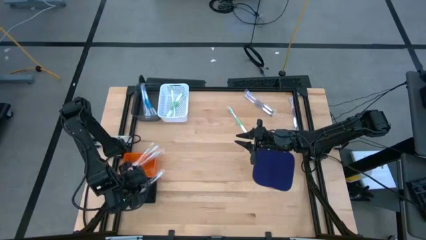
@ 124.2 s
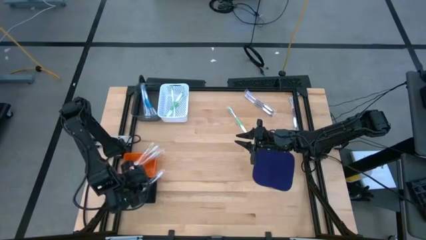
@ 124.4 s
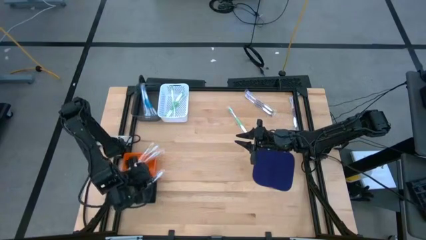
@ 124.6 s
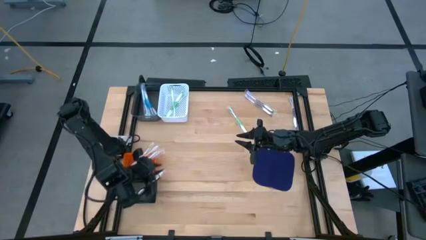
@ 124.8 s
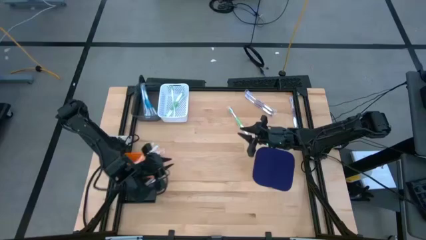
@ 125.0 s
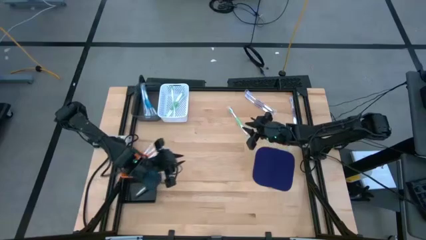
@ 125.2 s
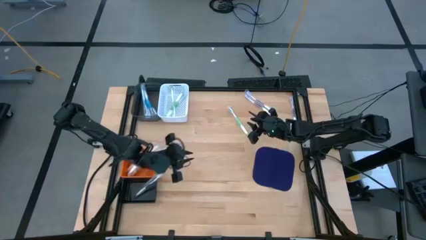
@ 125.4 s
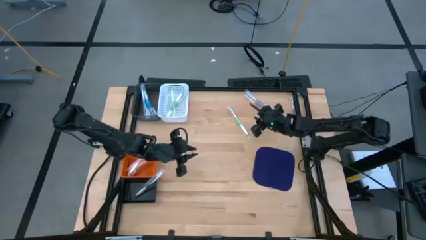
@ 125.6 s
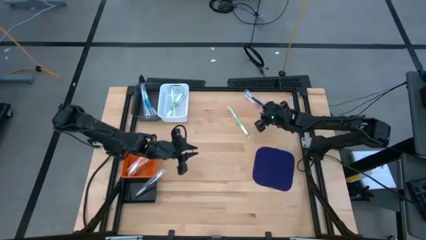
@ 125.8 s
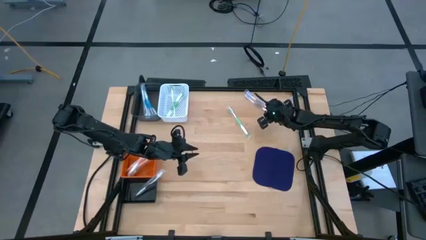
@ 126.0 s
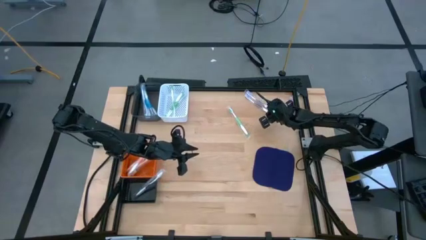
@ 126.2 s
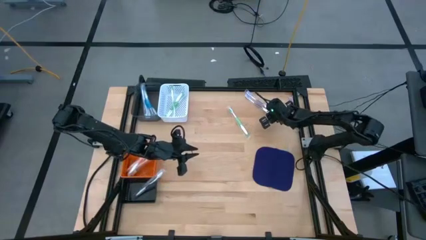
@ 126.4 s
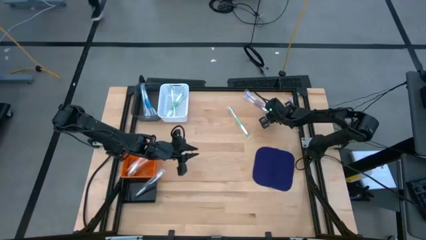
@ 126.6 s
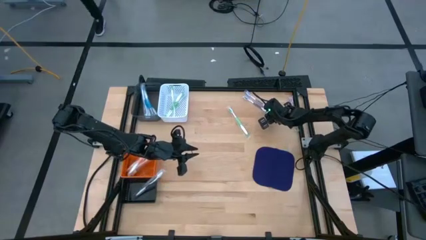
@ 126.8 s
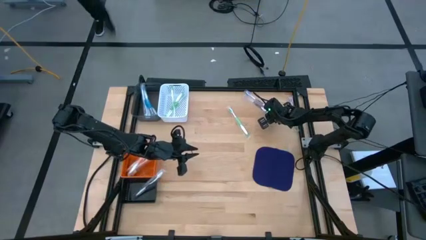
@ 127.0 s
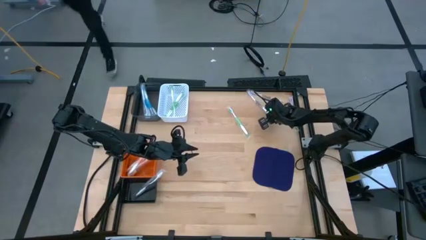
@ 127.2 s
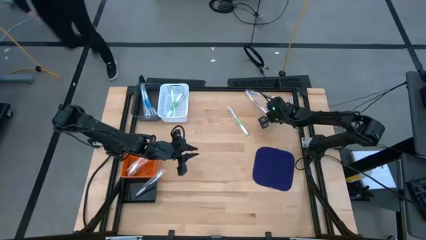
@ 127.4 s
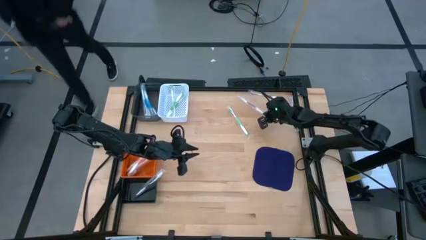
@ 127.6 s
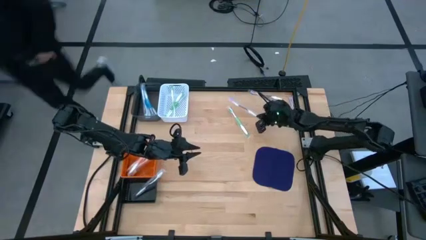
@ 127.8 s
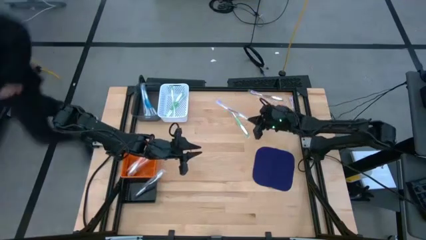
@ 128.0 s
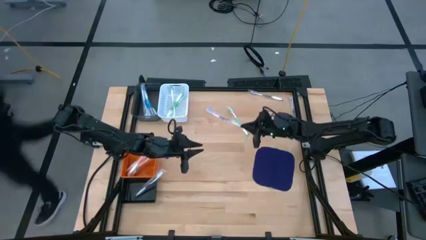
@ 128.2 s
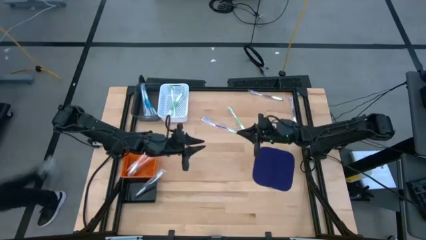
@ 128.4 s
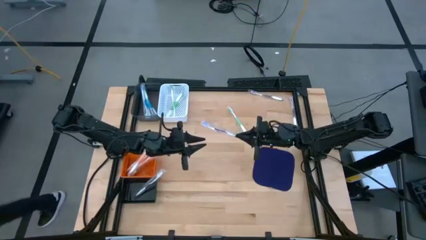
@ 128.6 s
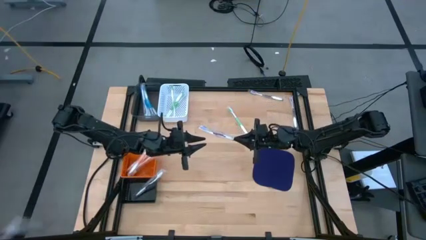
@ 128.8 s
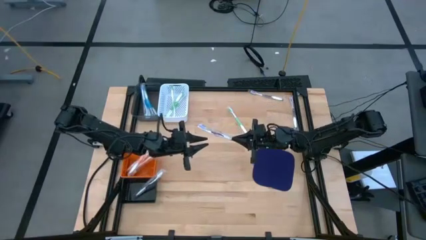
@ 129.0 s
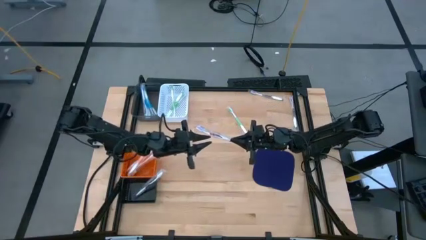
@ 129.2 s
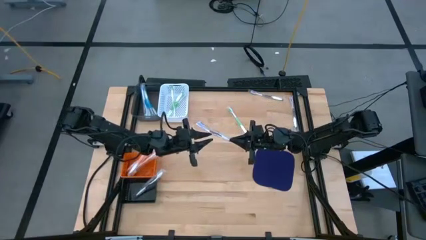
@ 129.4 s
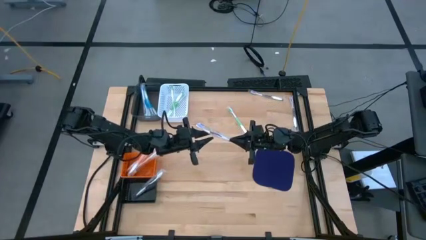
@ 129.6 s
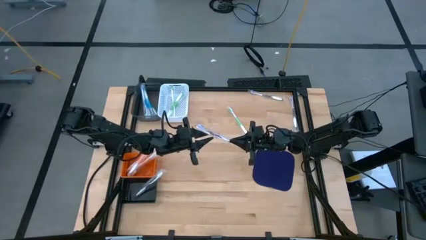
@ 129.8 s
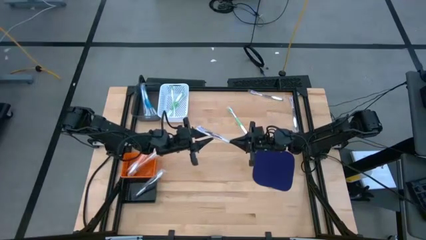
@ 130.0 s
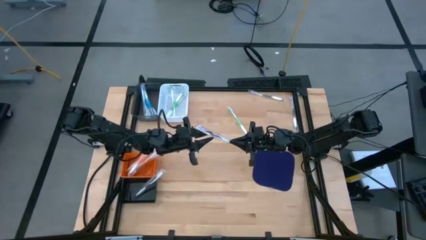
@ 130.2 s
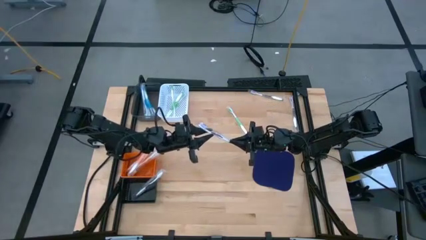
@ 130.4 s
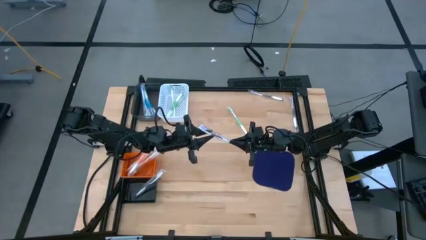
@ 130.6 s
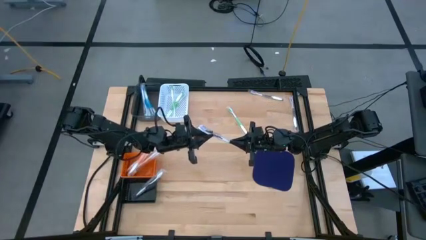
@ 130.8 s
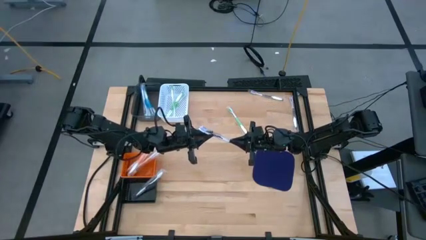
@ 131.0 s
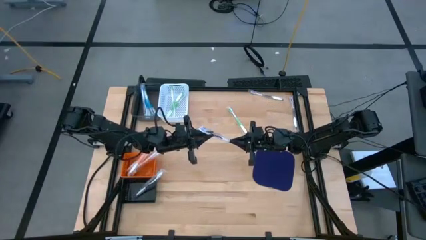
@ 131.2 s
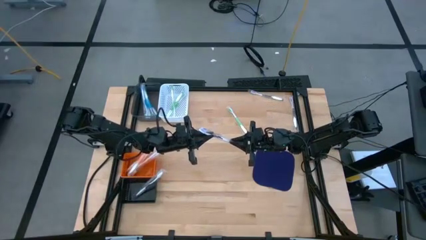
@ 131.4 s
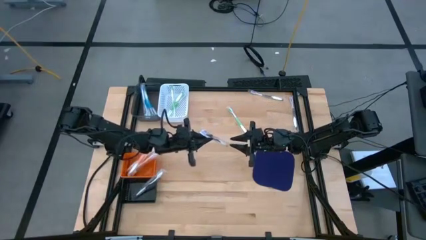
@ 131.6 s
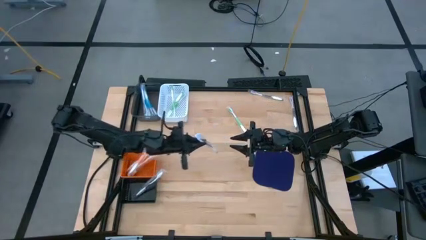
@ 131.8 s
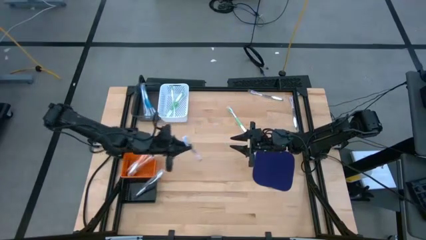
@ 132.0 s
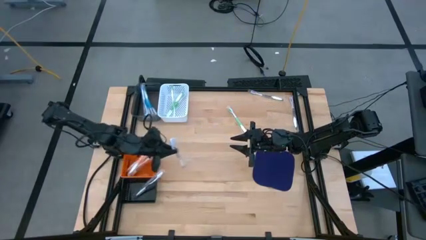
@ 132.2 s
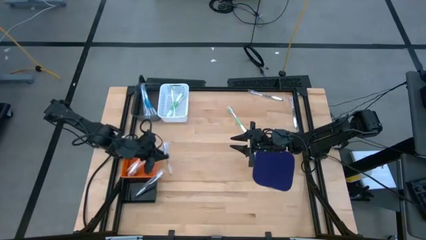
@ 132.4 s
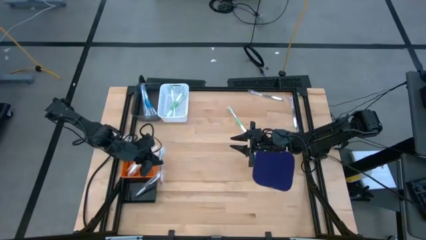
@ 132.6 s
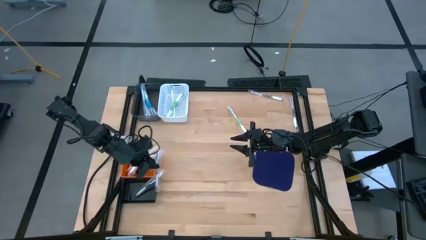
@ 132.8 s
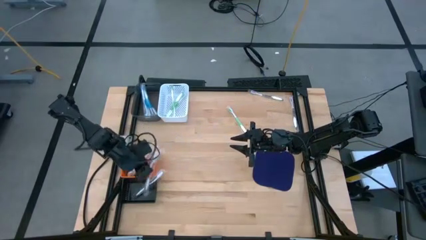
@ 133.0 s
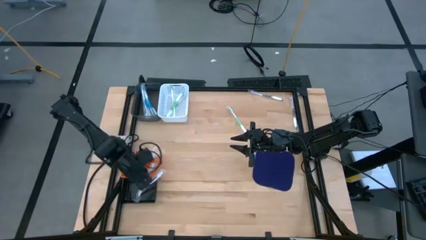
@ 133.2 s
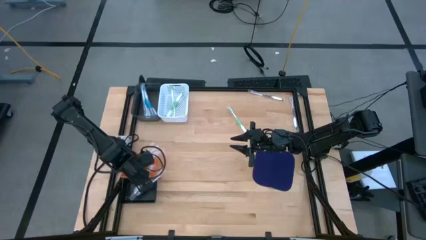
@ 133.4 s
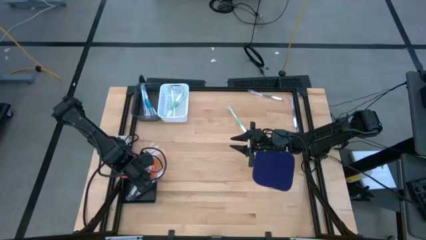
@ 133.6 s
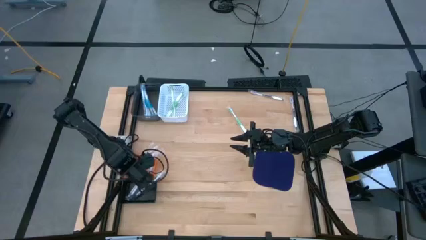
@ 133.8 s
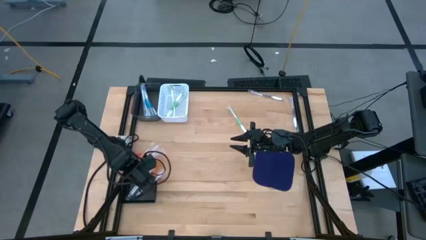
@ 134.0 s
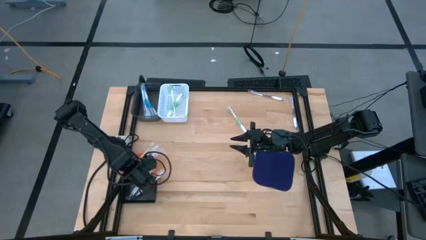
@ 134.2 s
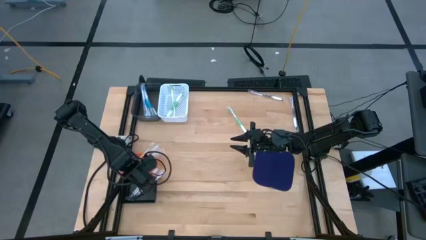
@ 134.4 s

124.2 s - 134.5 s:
Task: Pick & Place Toothbrushes
Put the violet toothbrush into the black bin

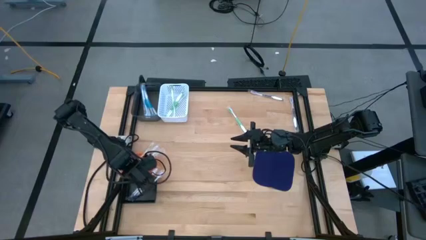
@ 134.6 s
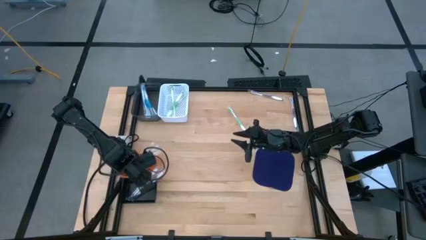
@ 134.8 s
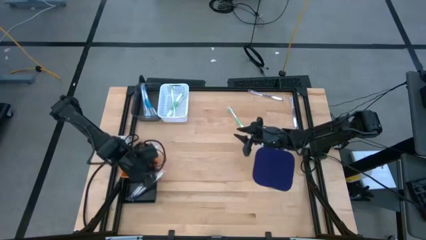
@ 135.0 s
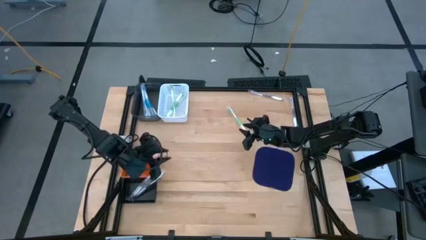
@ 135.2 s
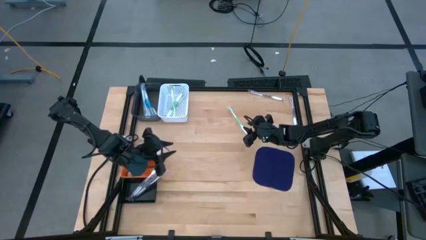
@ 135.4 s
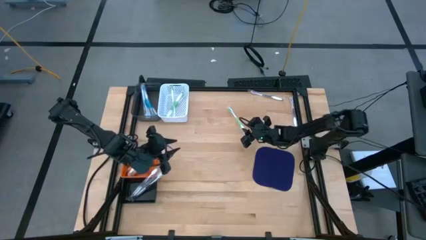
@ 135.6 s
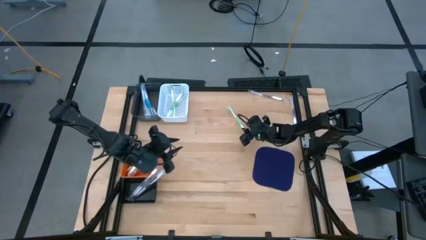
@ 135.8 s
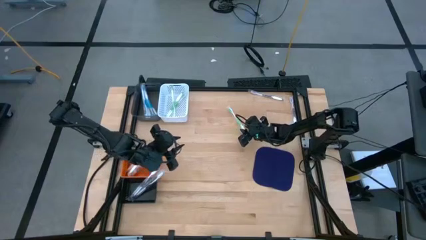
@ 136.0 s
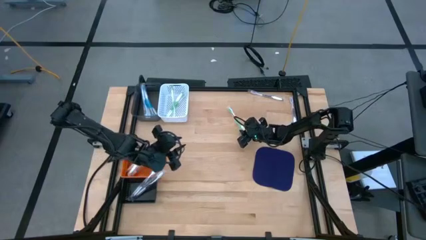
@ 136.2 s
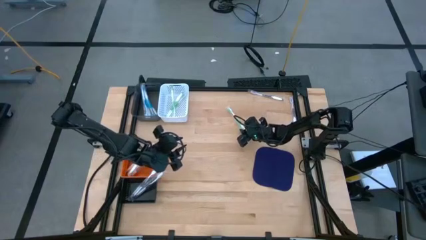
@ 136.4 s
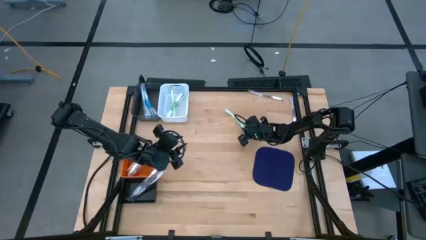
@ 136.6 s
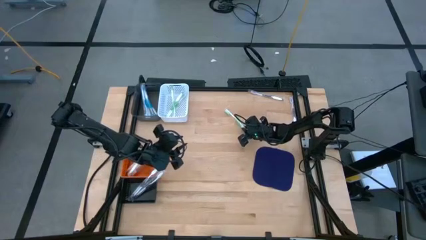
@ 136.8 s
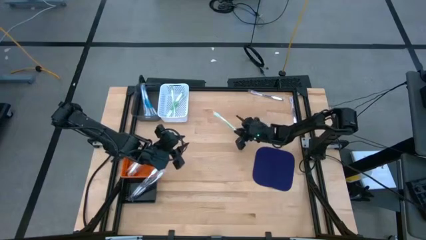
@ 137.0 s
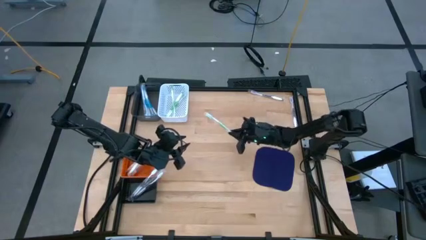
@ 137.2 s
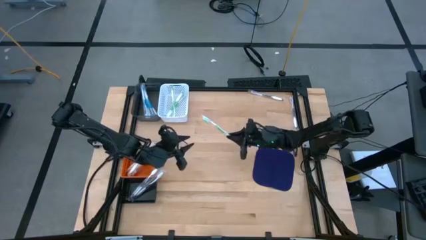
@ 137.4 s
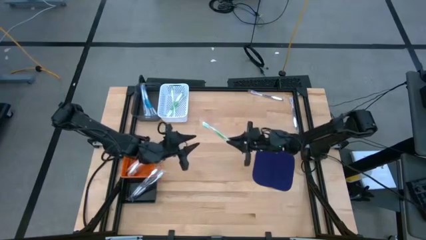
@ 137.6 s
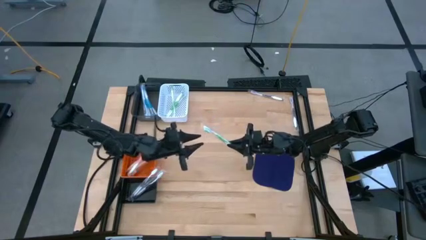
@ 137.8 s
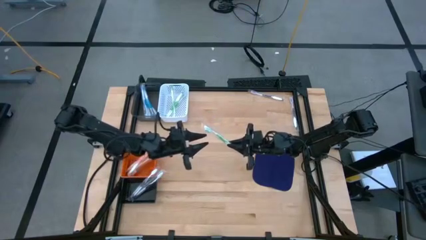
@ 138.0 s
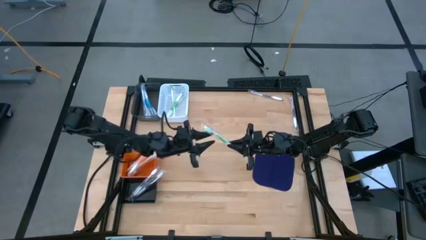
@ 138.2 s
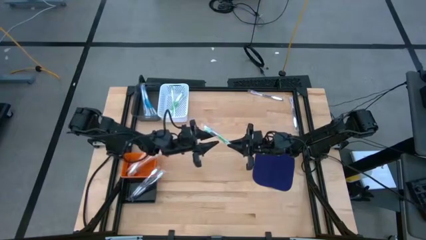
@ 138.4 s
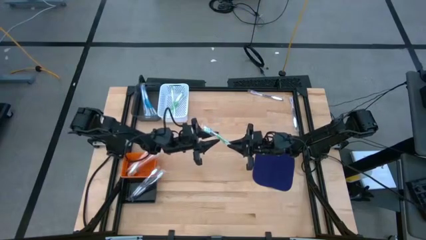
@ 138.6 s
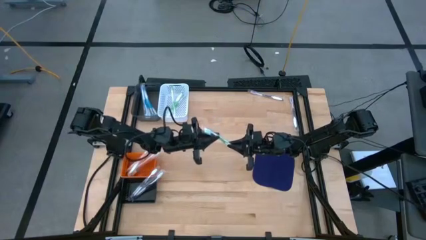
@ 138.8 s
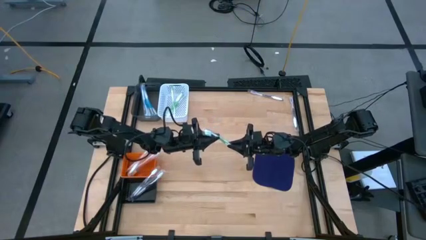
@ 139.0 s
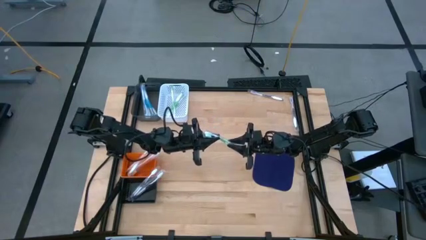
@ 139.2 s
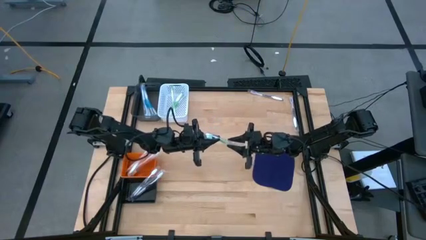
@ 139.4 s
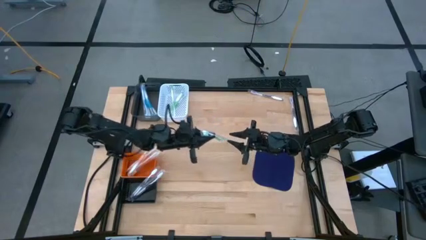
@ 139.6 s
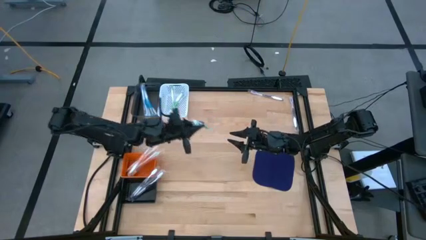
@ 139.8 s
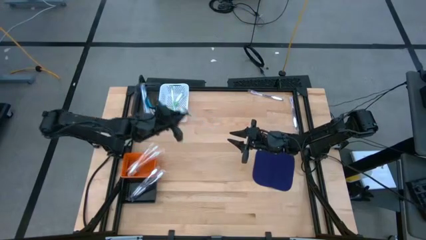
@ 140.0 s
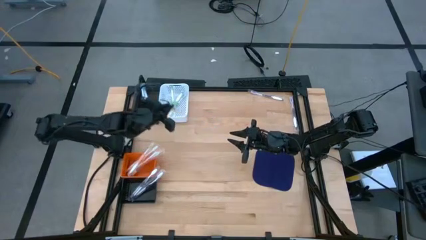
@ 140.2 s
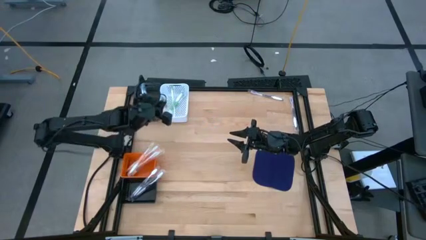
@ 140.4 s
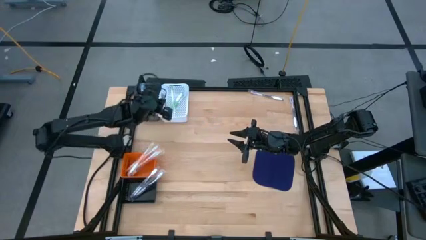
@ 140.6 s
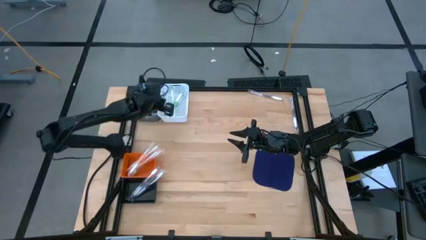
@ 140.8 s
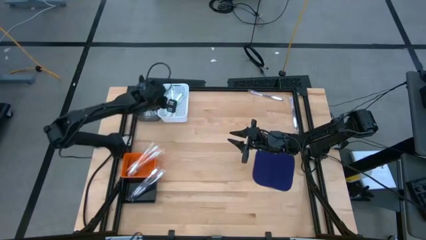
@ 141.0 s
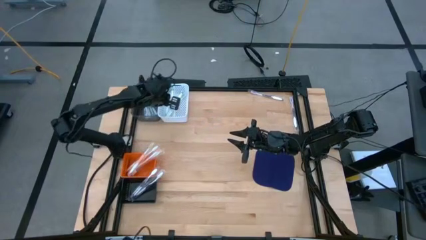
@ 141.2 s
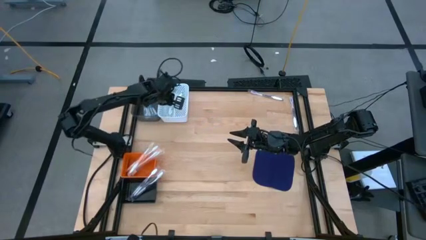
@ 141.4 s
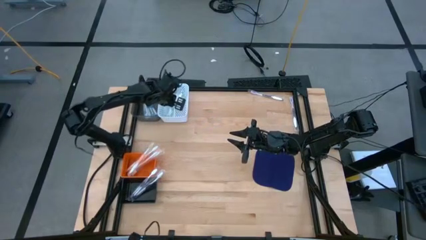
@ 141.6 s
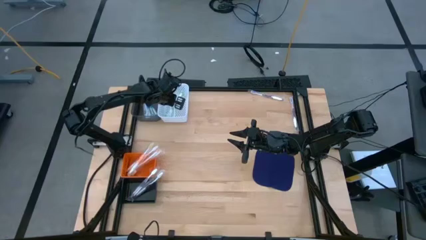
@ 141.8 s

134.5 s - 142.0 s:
Put the green toothbrush into the white bin
